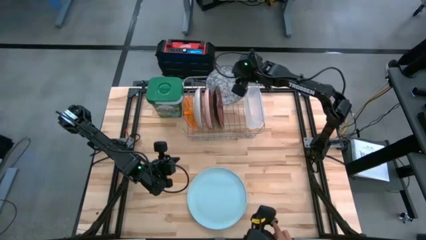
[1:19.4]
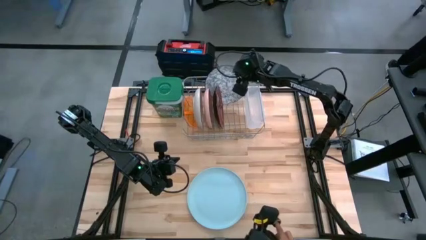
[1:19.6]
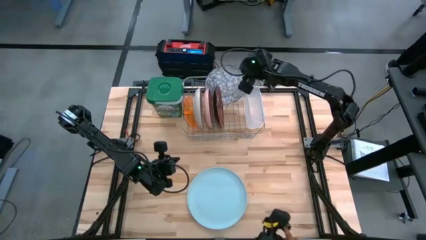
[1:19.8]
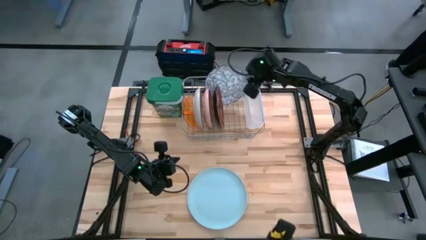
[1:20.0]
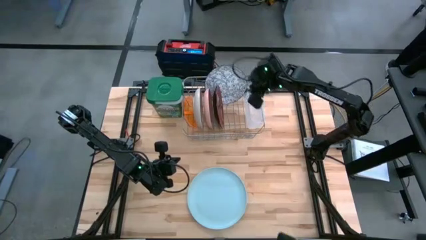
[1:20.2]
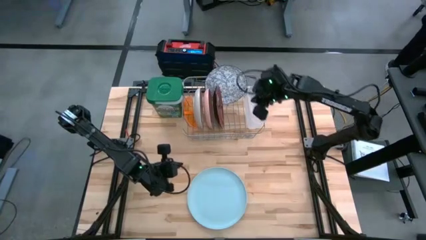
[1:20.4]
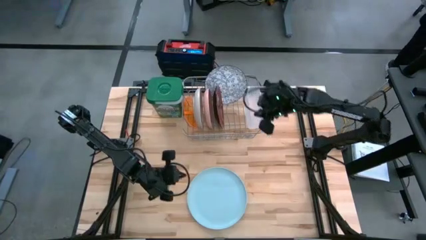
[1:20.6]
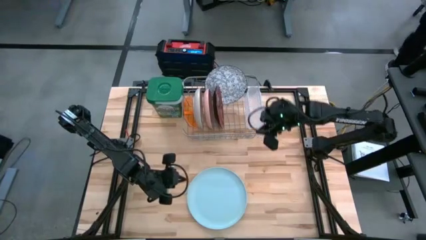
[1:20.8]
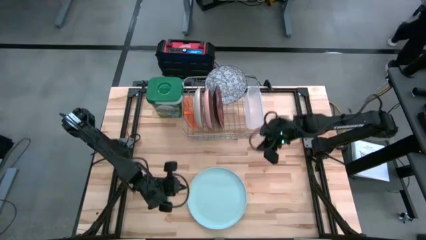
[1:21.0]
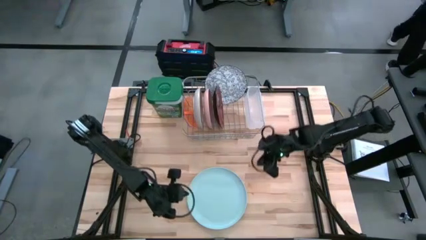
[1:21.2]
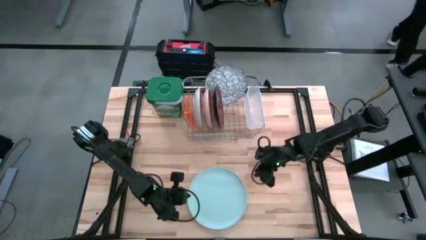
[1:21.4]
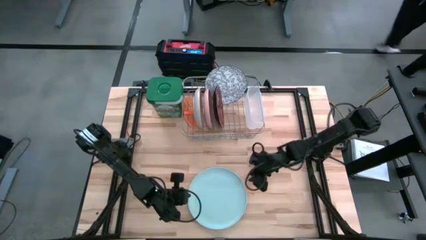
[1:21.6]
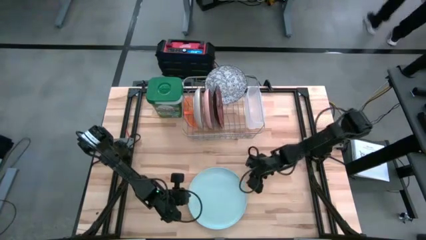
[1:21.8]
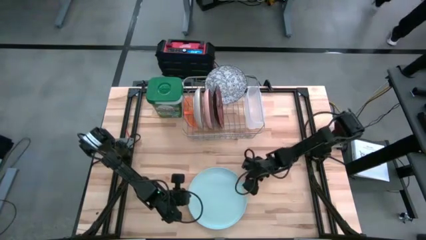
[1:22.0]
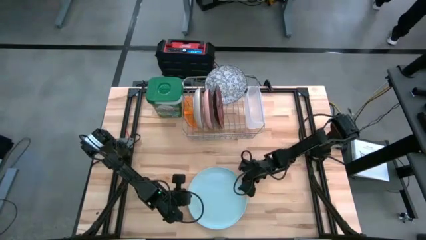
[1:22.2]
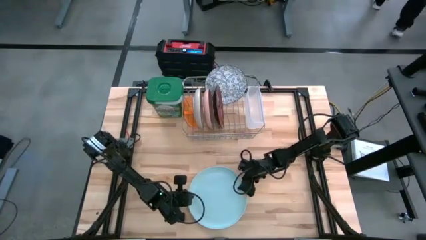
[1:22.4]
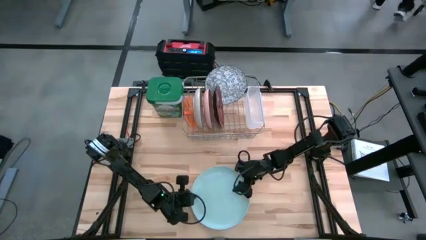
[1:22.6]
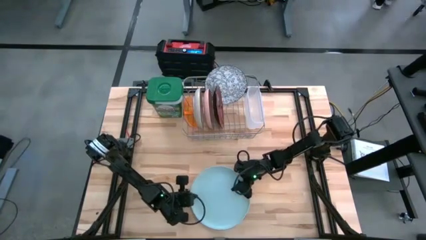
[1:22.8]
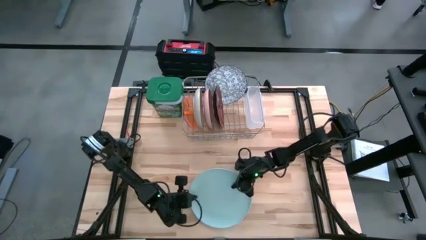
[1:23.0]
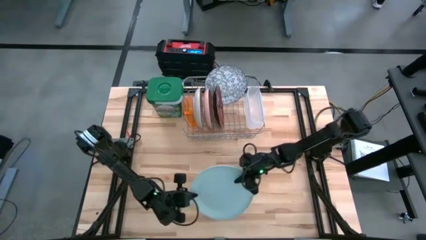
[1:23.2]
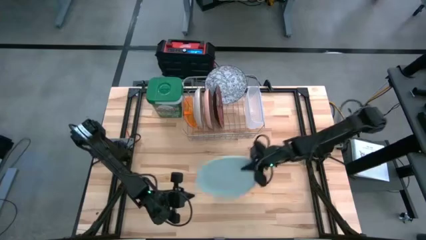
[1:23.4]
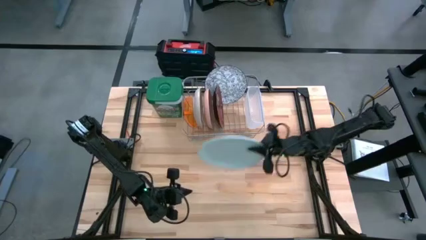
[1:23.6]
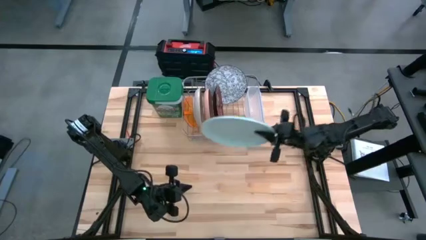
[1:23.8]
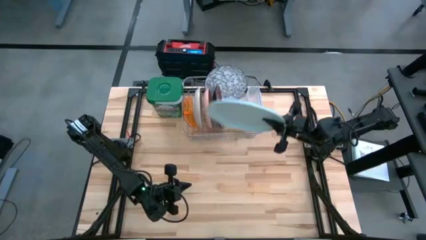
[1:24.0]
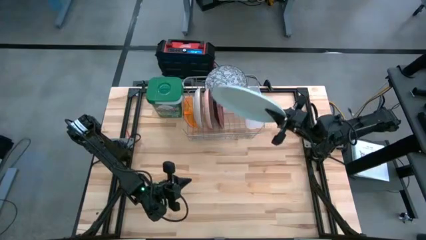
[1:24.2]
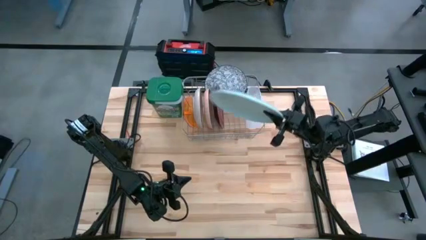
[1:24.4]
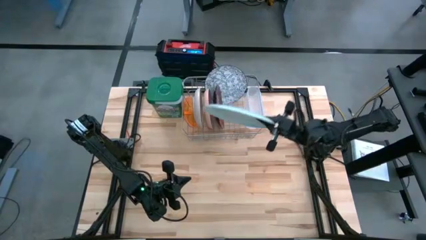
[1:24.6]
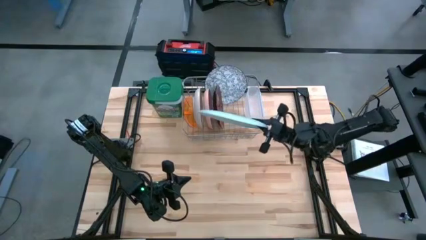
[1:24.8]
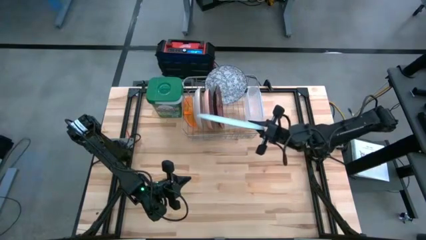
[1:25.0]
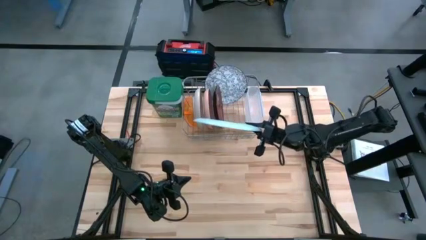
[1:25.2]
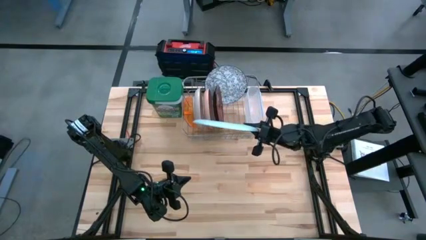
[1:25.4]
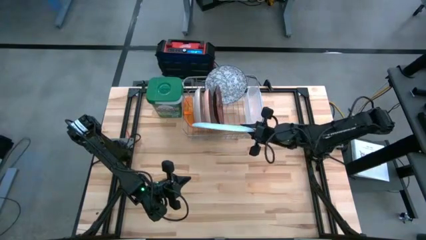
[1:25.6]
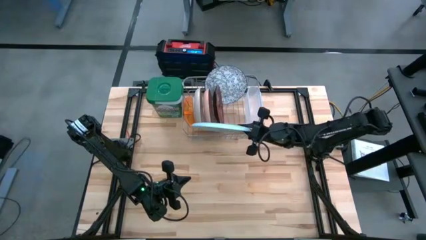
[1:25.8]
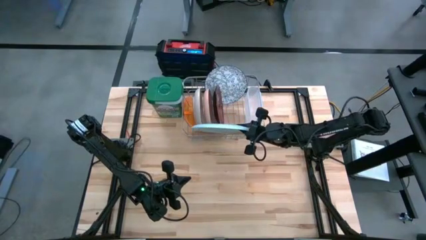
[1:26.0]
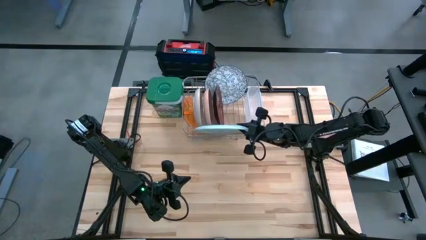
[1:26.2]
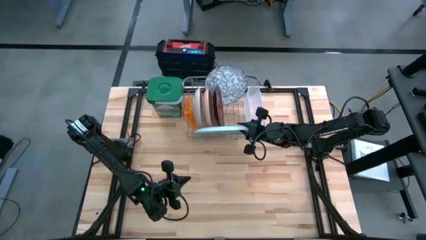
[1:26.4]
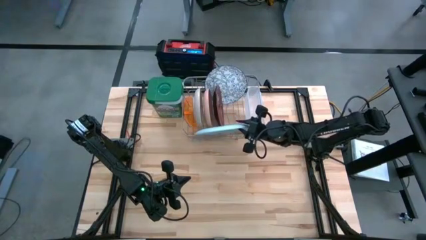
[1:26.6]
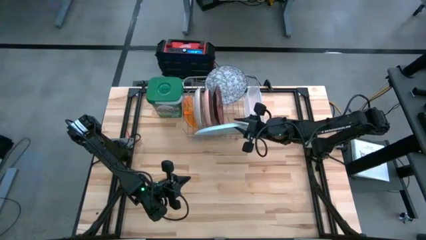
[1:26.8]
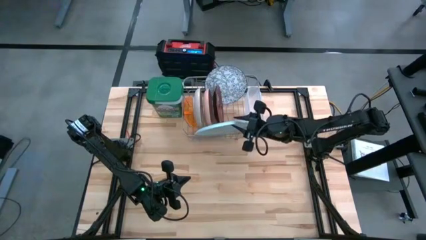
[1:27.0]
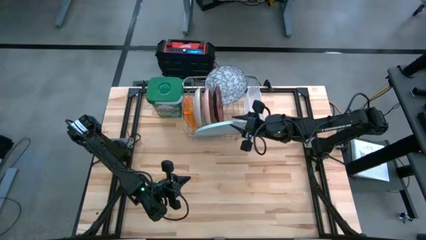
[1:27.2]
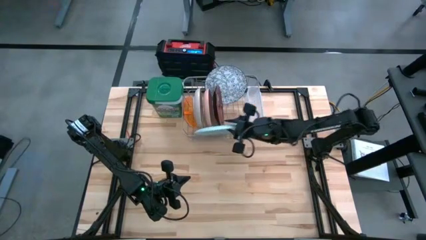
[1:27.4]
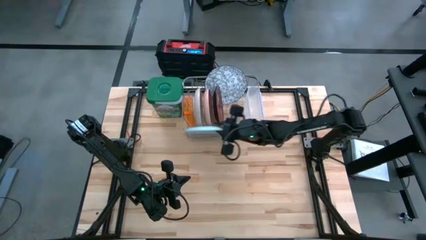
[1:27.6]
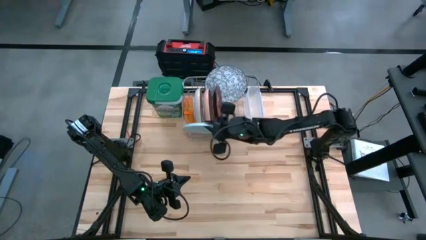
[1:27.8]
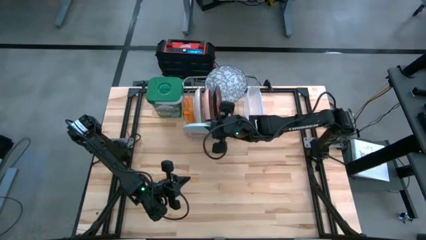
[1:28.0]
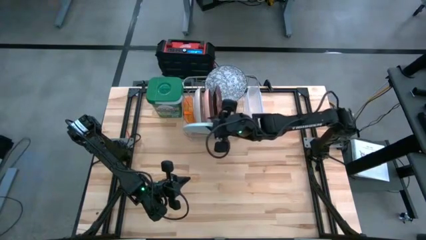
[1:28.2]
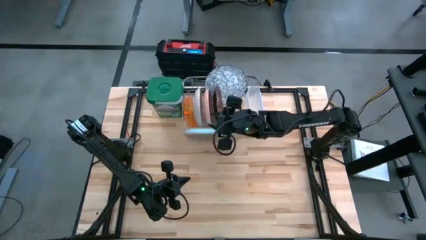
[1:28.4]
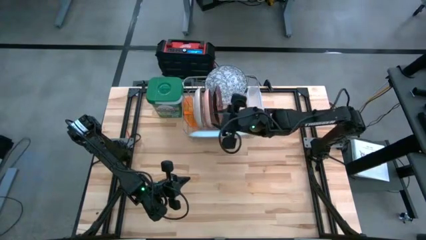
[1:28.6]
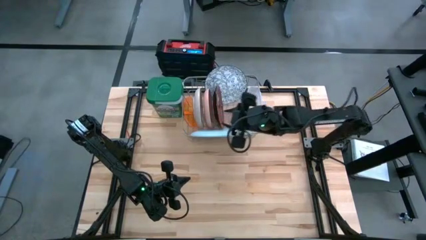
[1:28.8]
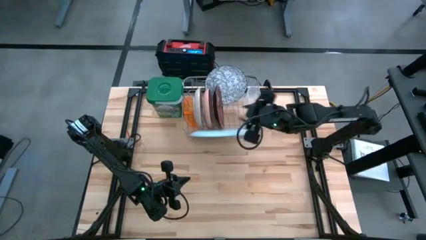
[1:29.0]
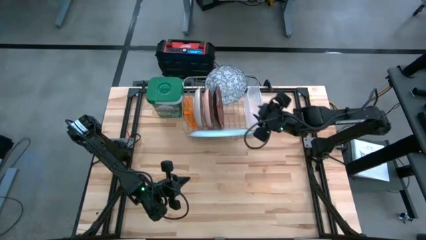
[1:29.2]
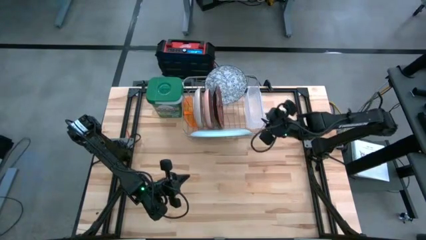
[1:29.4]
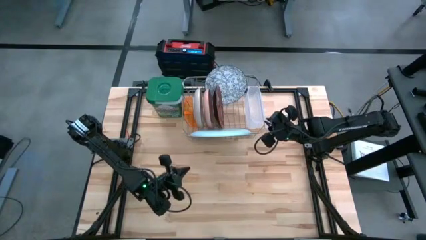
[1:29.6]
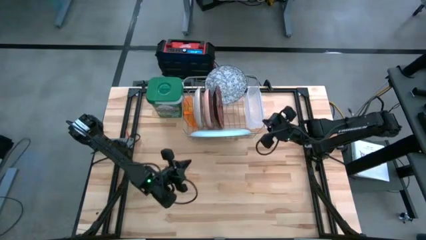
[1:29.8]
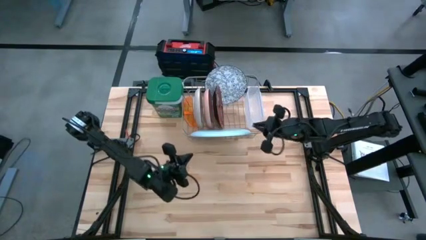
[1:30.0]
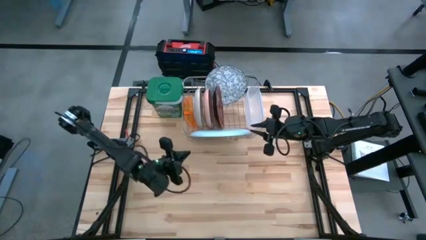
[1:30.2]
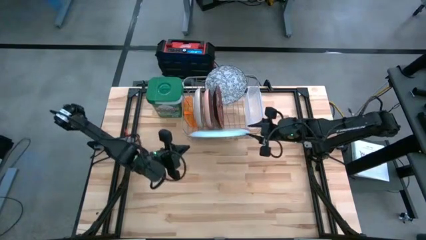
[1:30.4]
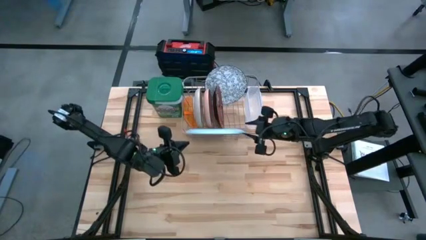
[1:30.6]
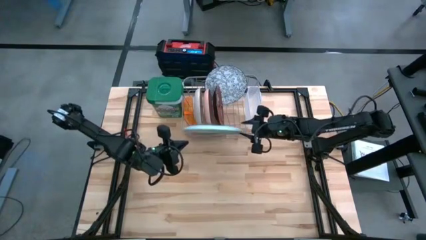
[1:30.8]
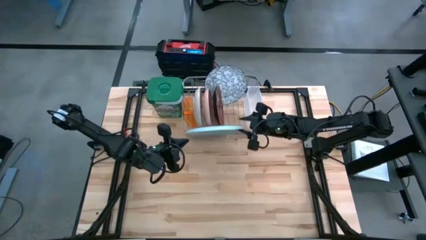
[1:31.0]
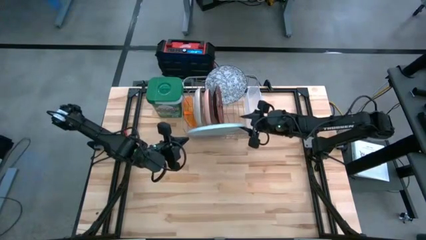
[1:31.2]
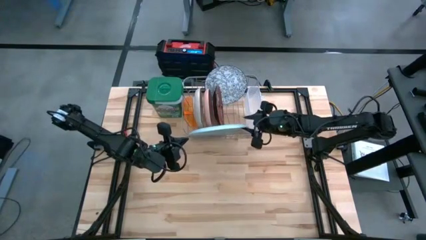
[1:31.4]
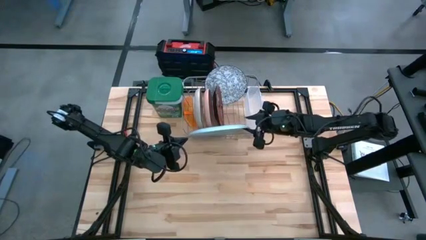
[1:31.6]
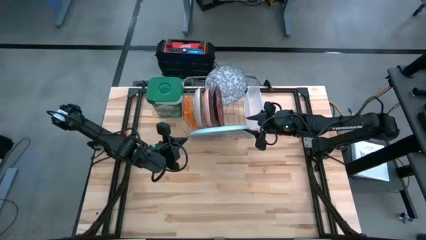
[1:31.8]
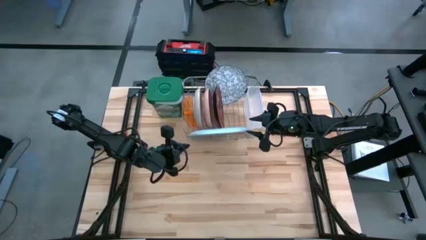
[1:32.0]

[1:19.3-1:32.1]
Task: Sort dishes
Put the blue plate in the dishwasher rack
